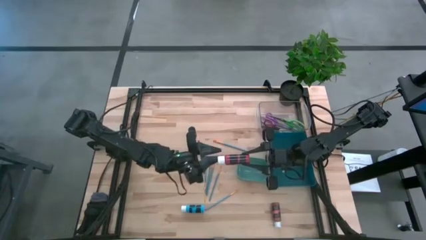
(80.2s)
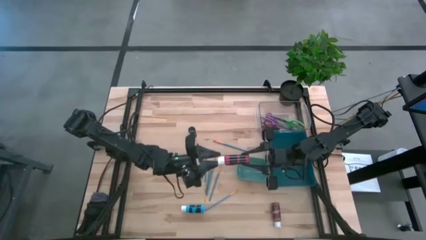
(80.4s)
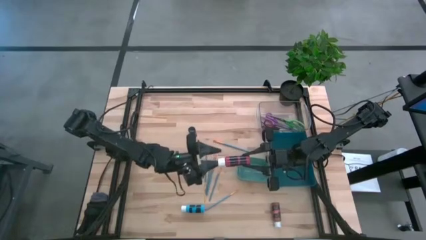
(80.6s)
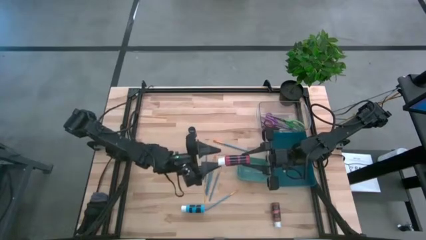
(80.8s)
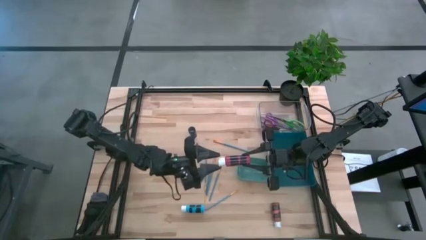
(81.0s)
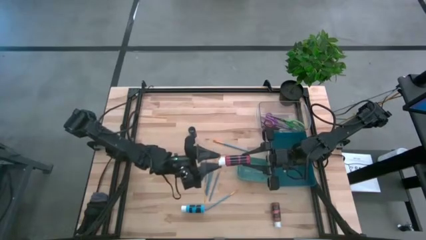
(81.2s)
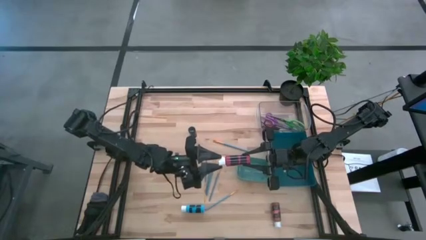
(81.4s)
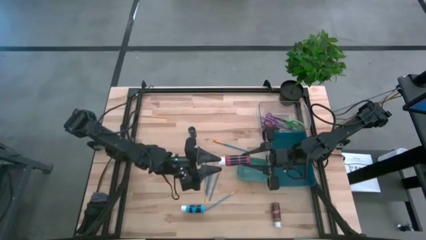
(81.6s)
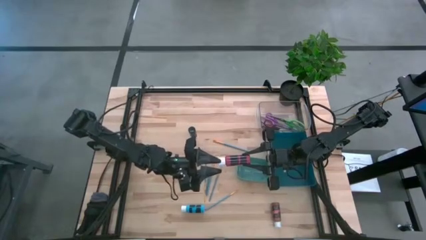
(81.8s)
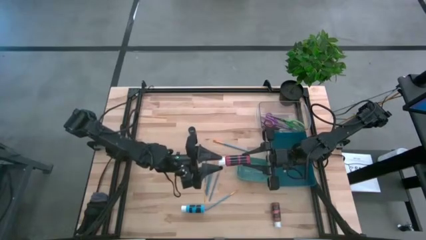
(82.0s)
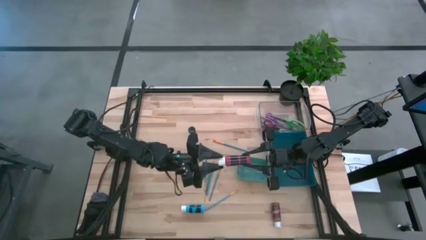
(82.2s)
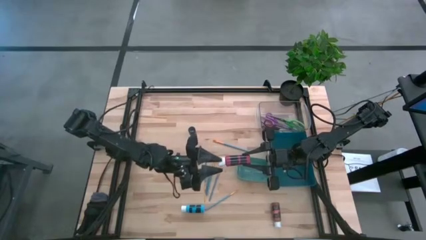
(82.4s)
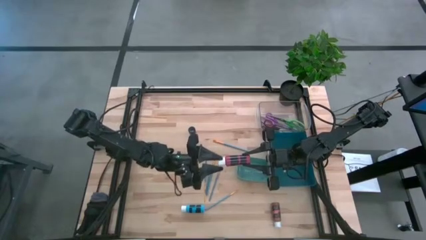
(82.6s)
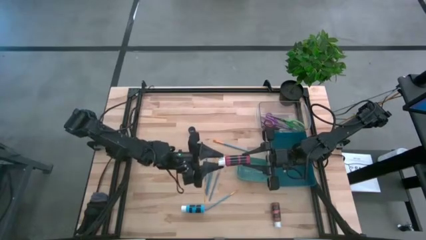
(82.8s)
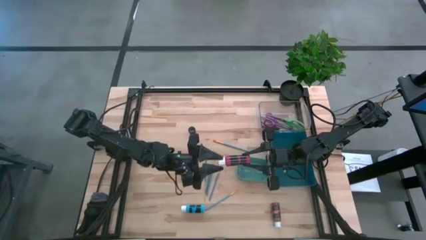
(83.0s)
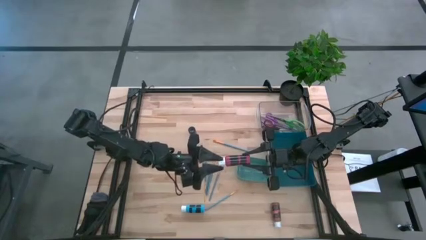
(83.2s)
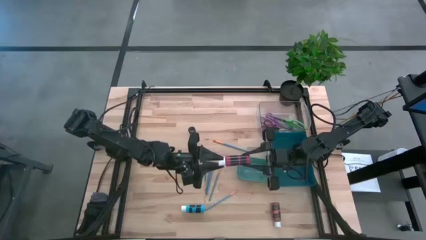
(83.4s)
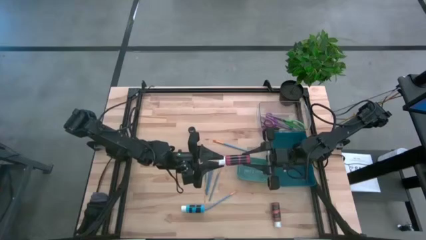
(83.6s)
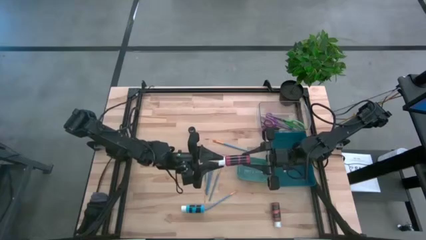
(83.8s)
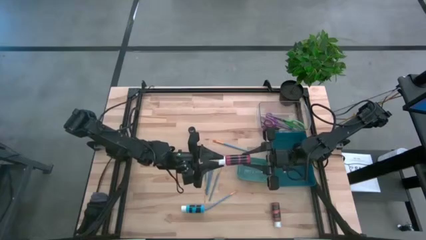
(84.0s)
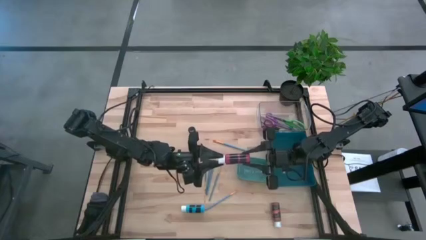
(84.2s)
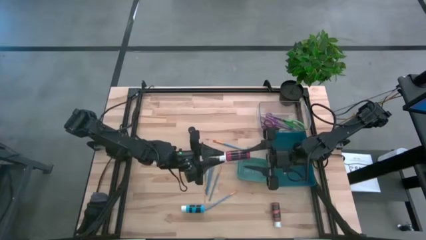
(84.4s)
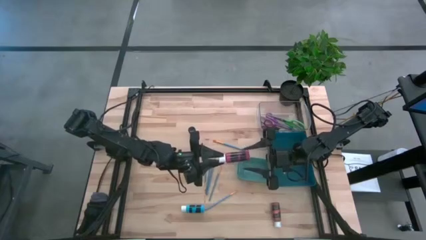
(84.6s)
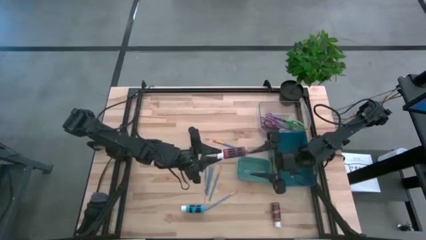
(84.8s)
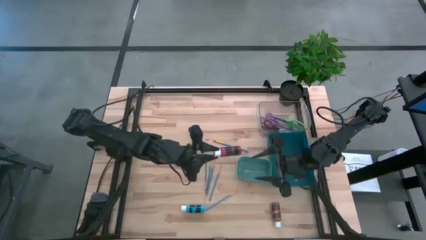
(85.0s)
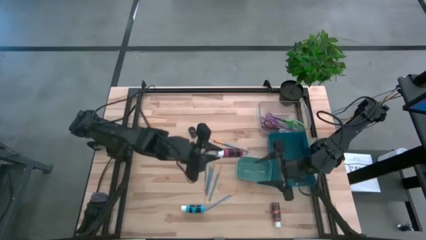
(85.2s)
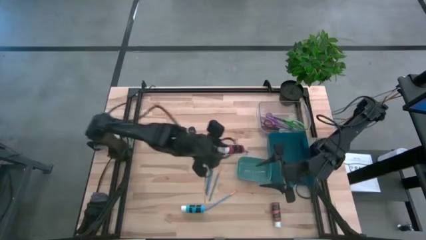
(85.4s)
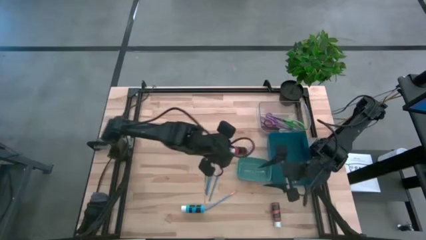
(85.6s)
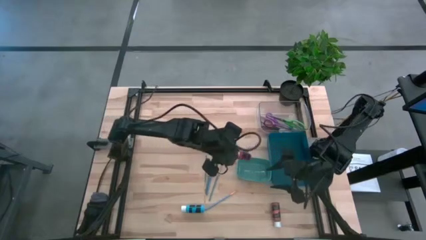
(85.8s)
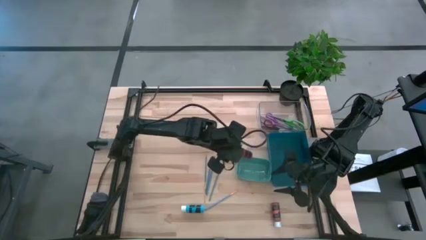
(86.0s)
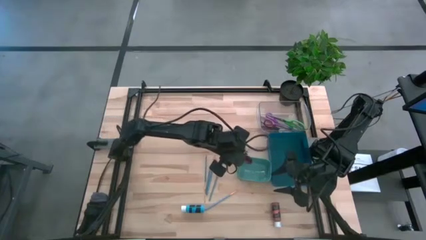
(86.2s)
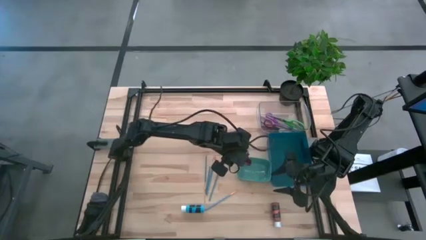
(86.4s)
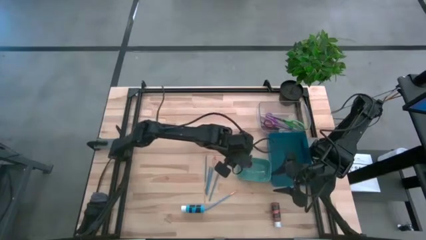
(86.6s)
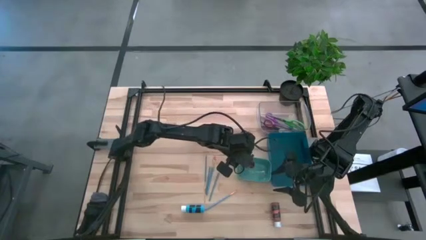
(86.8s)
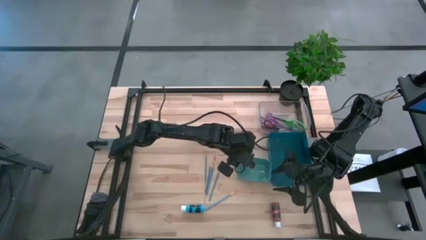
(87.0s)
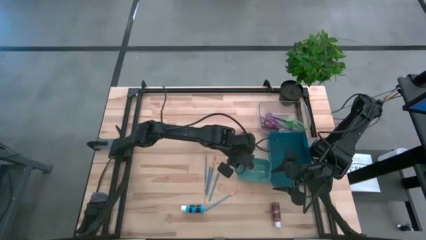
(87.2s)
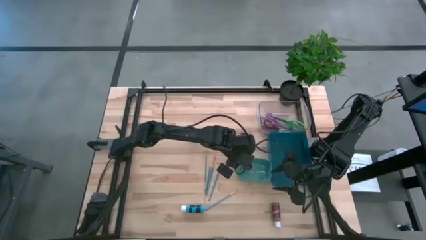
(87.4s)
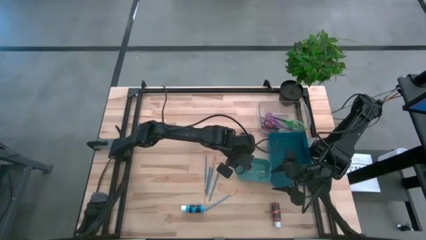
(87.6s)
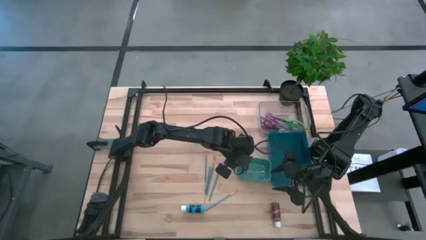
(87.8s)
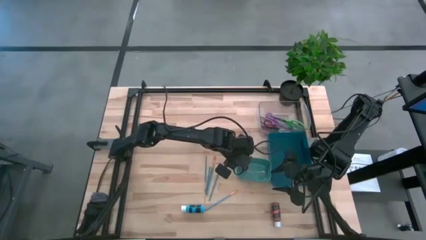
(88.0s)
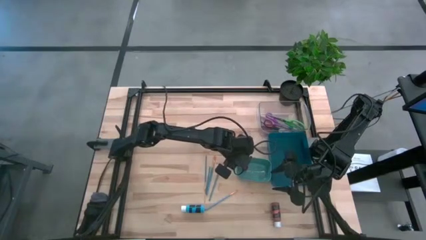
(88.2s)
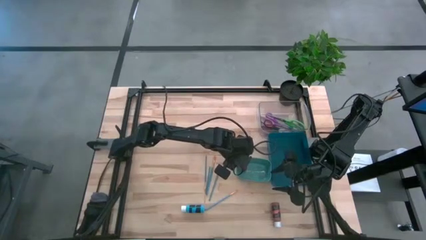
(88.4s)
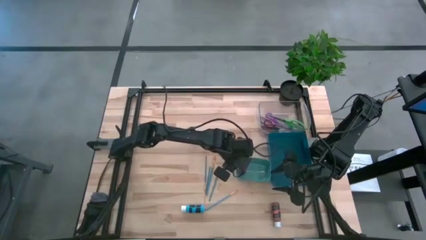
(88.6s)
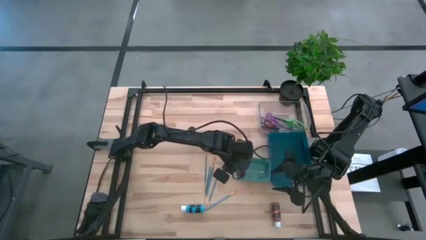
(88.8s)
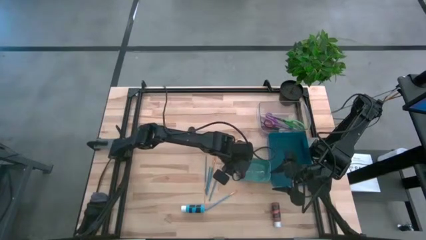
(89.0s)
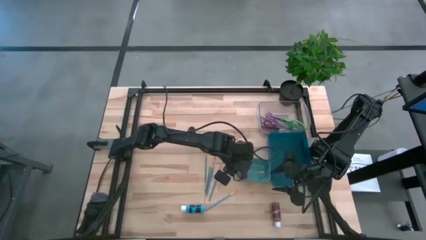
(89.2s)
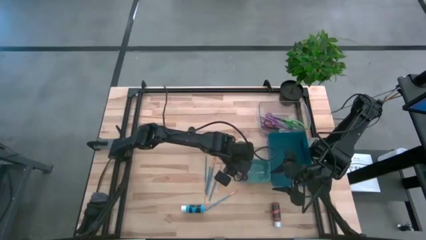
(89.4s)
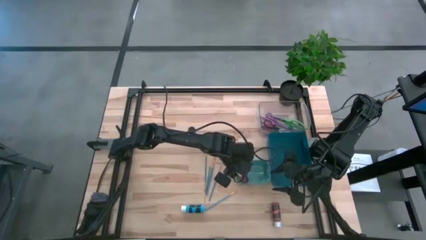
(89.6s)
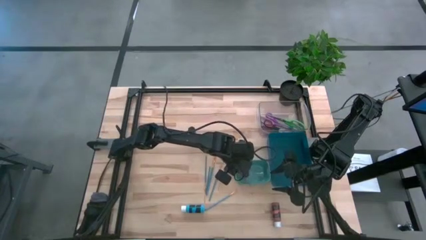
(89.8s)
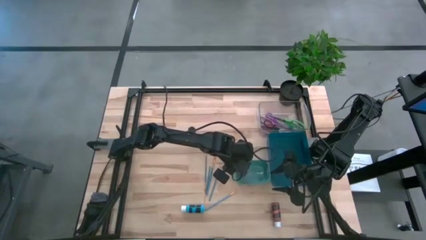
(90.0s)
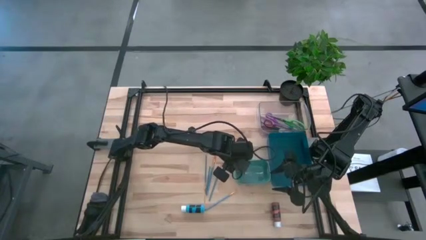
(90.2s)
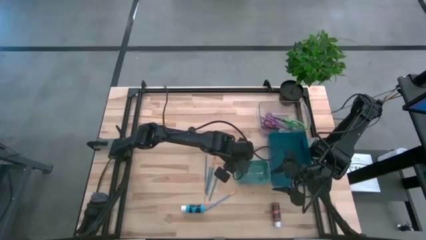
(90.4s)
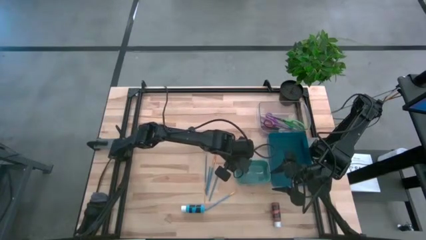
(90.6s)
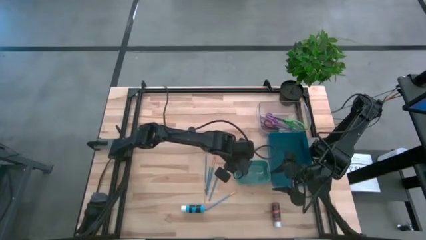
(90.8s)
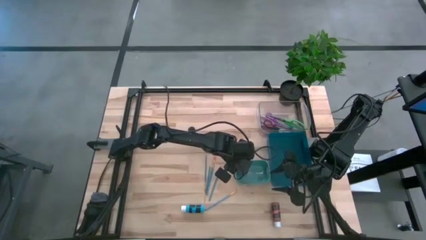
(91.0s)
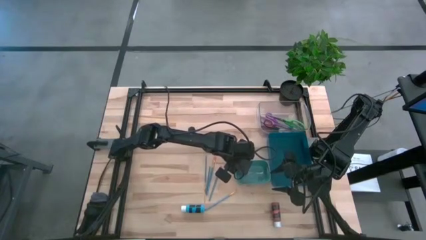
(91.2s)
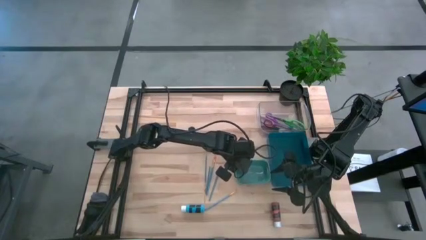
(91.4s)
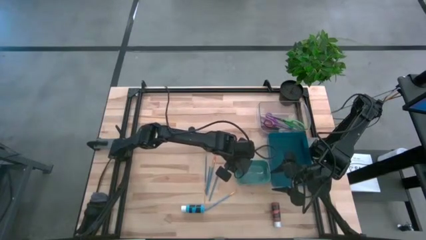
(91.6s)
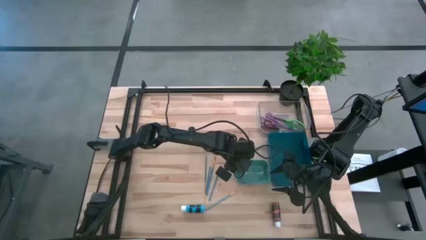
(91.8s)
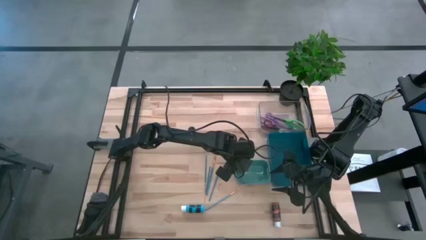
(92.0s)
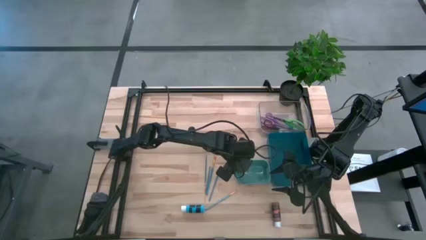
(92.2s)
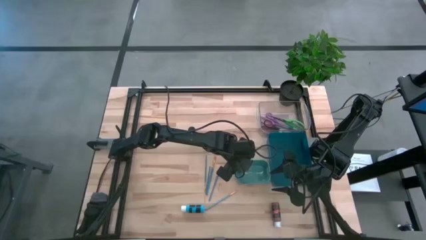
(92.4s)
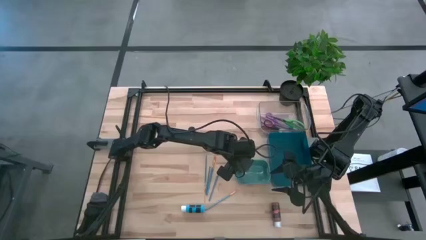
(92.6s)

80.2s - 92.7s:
Task: Pick & Place Paint Supplies
Put the red paint bottle into the green bin

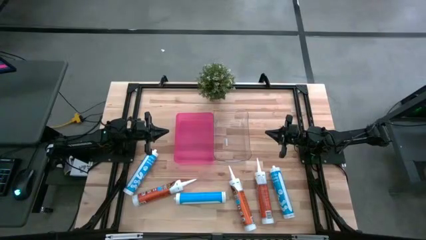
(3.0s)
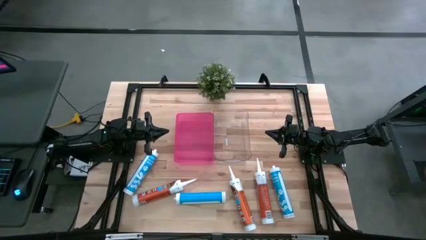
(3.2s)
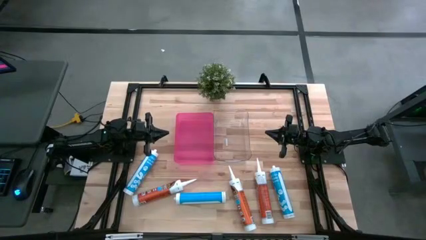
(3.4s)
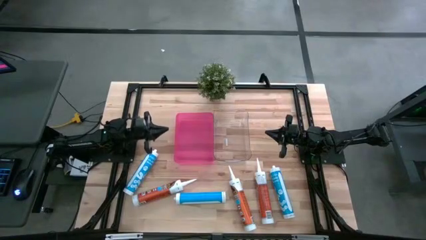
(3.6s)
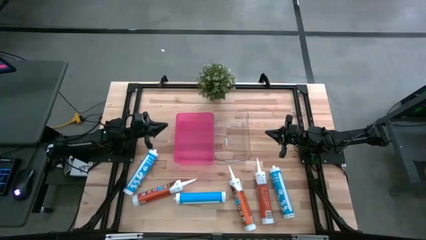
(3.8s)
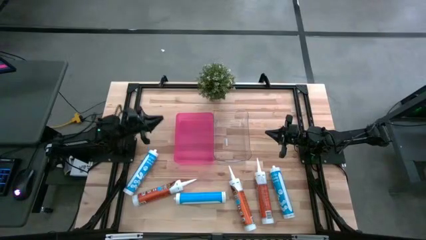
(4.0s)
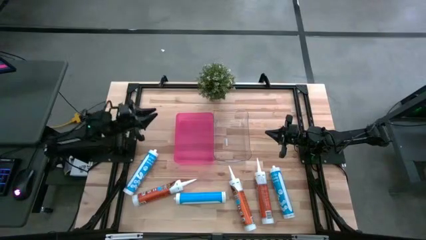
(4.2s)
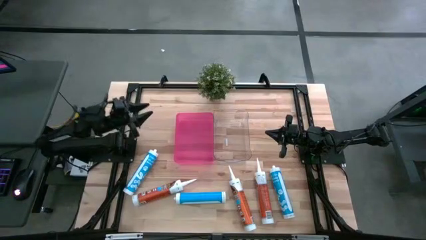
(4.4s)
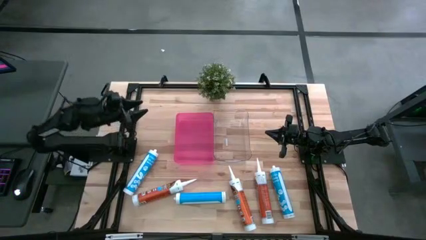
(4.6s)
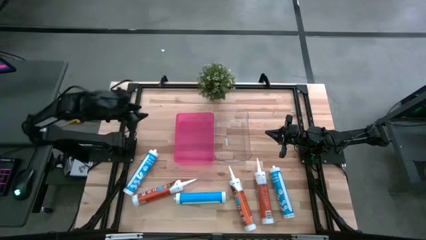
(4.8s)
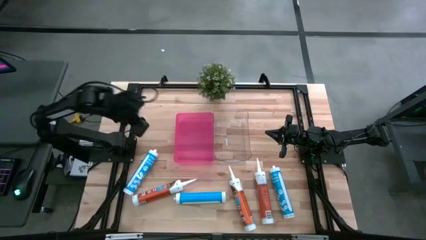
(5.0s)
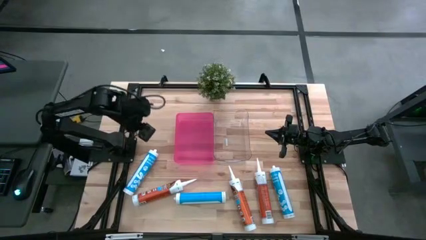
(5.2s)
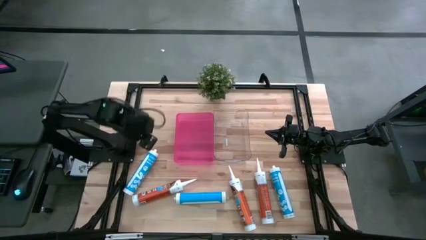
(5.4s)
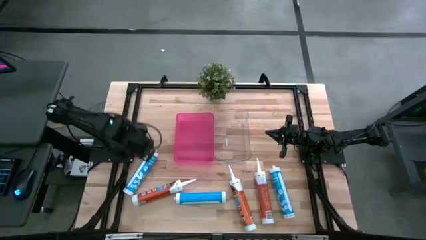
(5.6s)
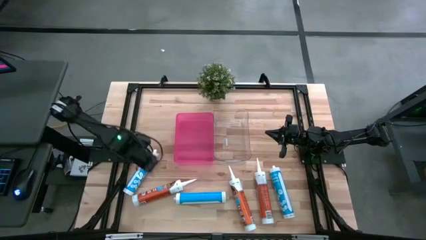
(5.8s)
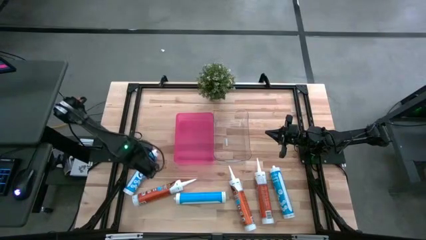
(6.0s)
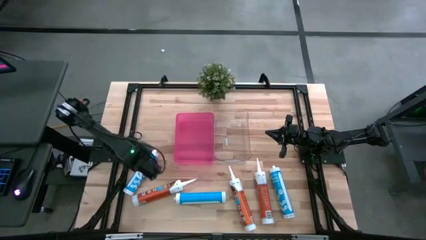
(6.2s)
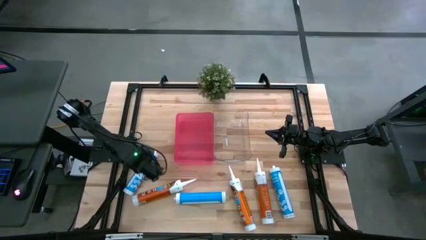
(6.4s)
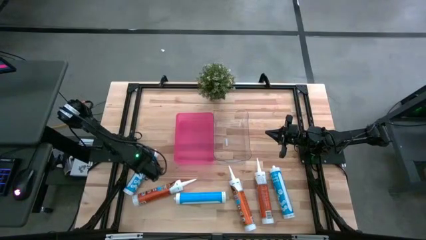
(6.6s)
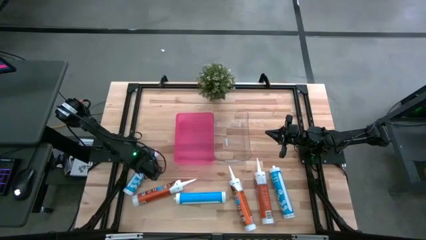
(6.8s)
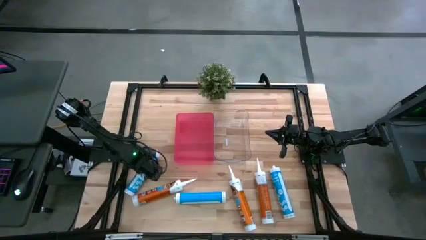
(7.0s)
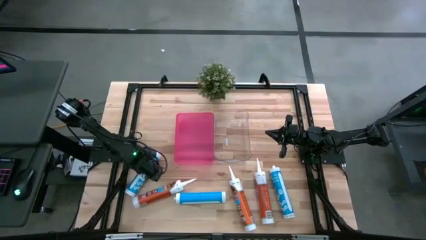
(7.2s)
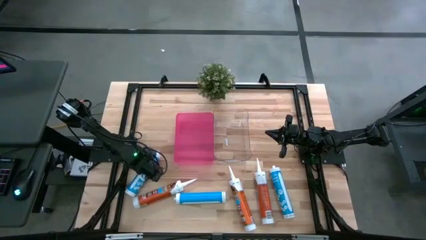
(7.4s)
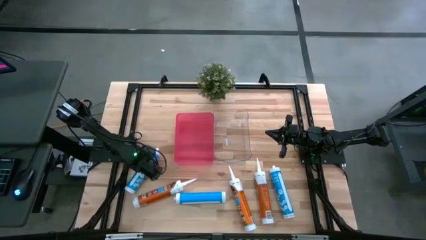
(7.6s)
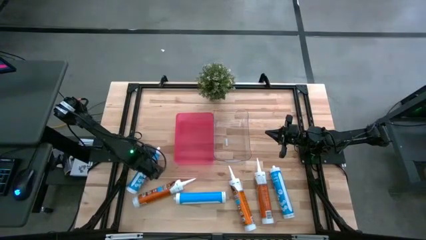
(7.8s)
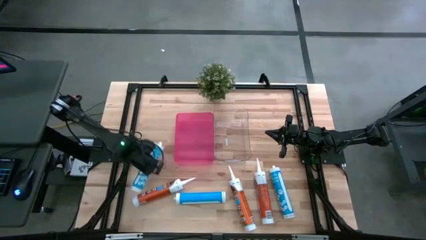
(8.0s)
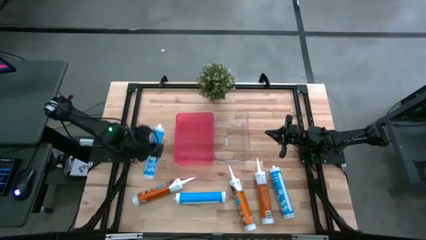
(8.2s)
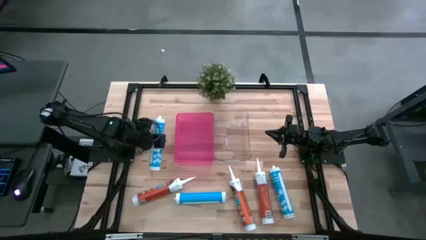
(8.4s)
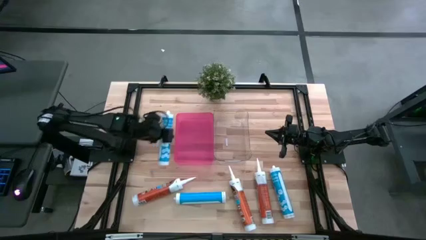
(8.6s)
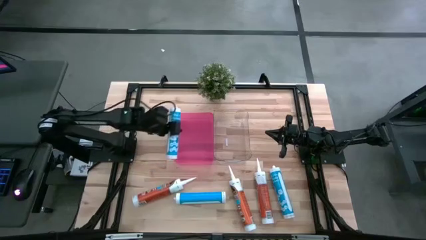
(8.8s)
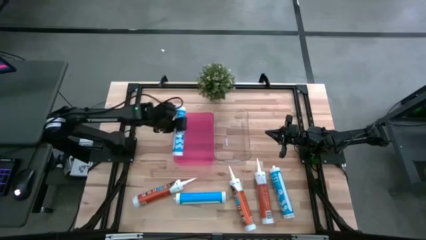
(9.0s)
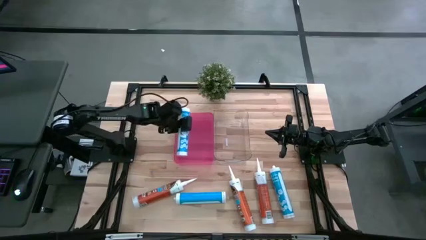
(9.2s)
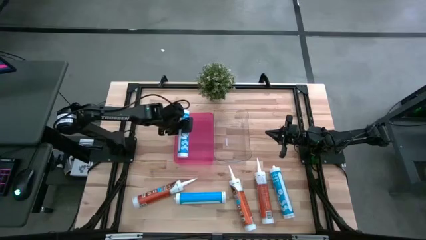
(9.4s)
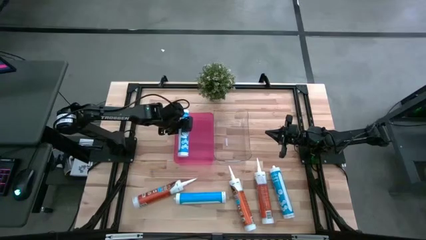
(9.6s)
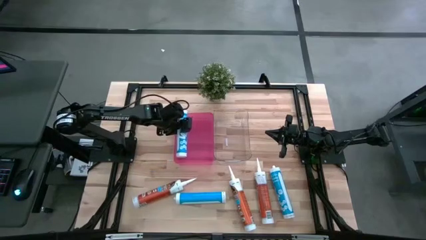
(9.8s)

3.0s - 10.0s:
Task: Pick & place silicon tubes, Sealant and Lysol wipes
Put the left blue sealant into the pink bin
